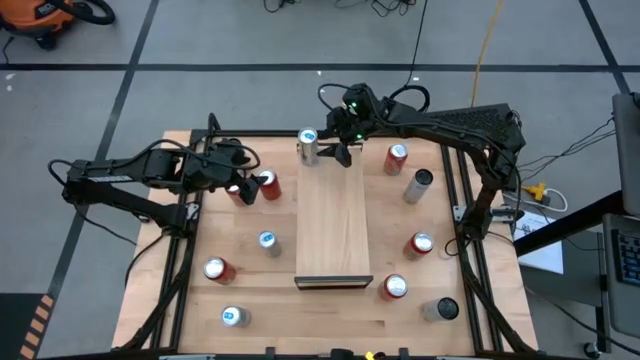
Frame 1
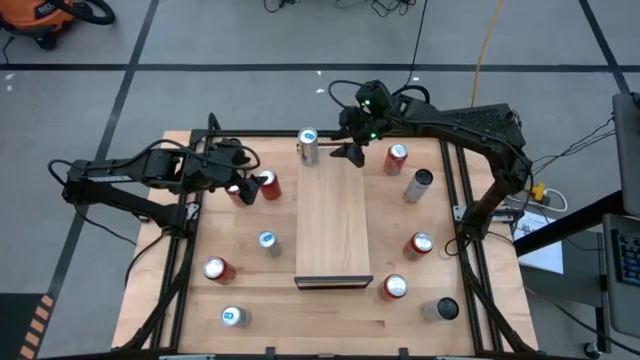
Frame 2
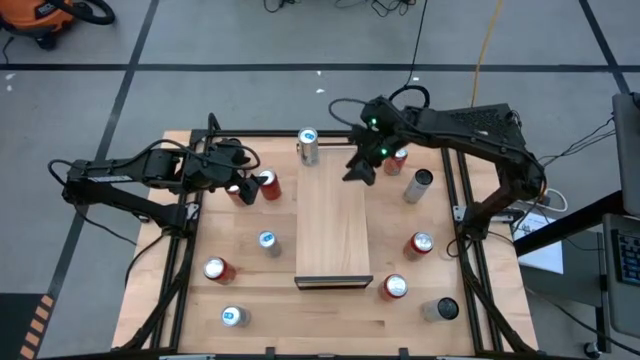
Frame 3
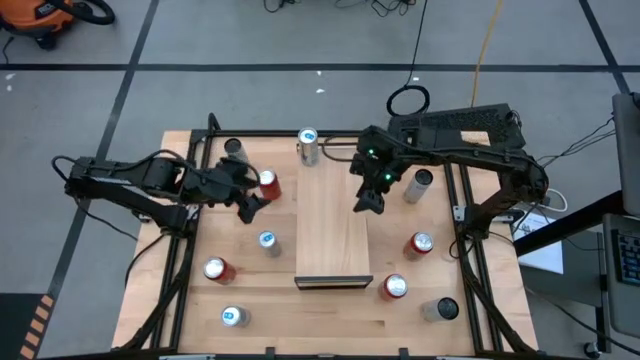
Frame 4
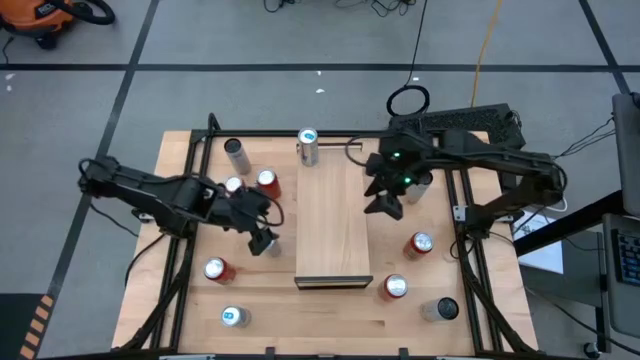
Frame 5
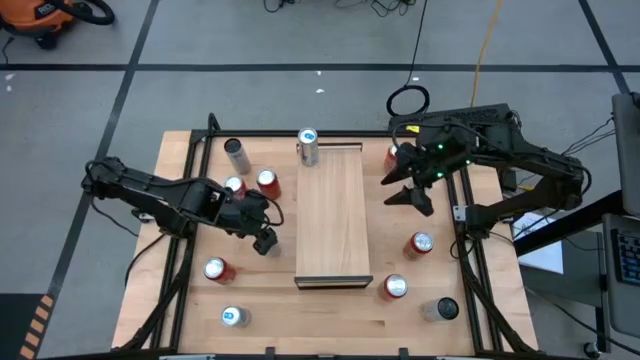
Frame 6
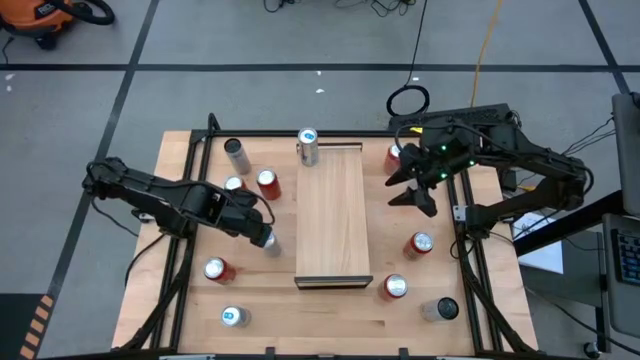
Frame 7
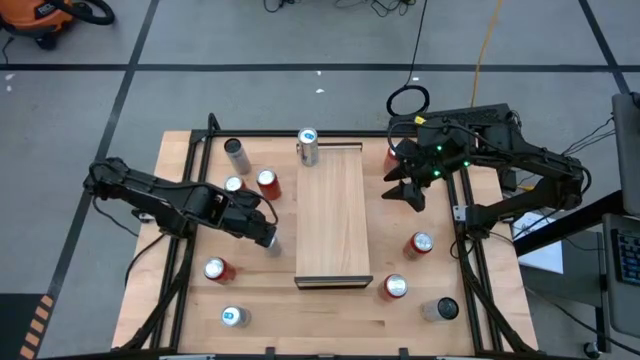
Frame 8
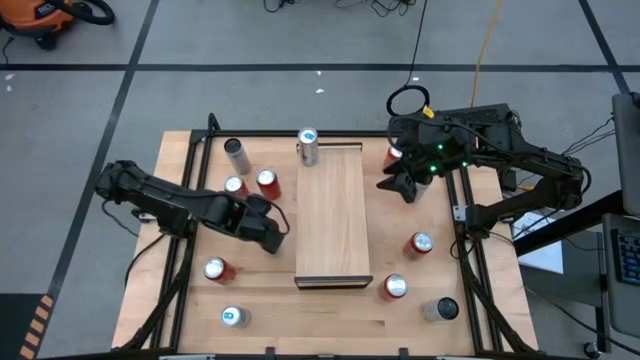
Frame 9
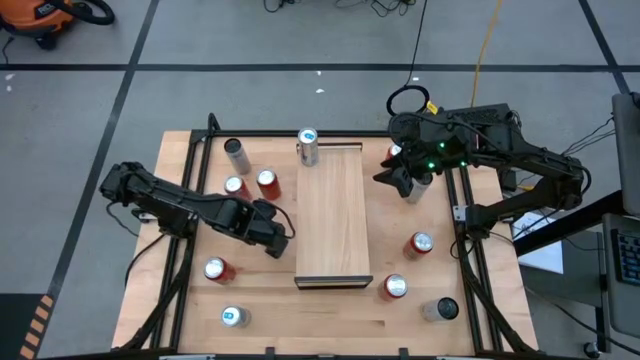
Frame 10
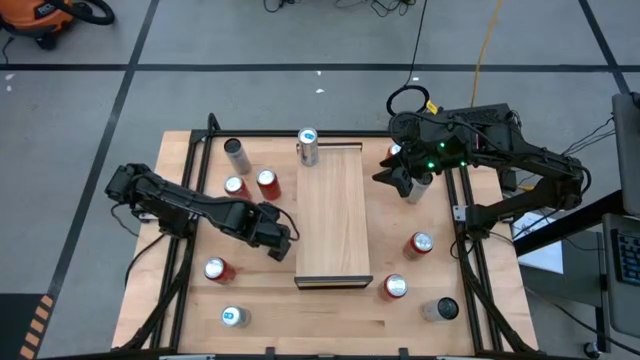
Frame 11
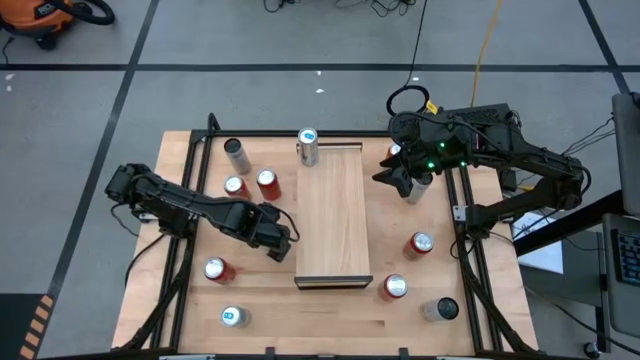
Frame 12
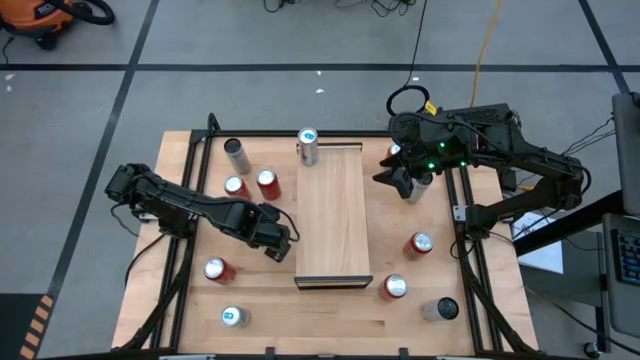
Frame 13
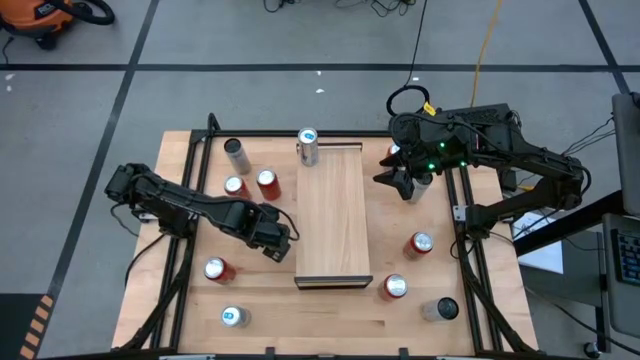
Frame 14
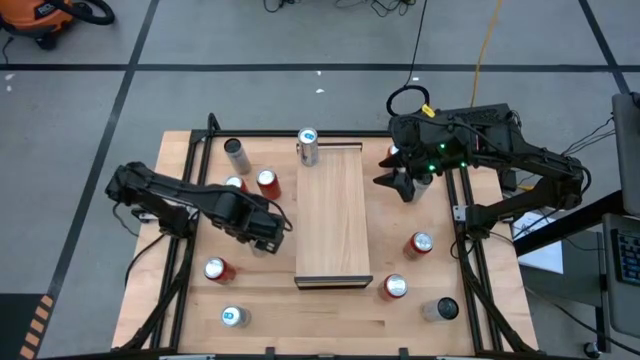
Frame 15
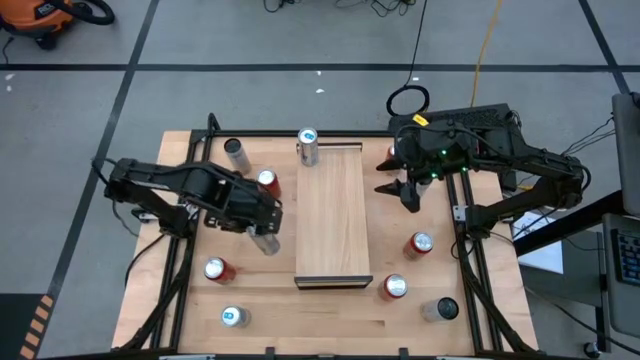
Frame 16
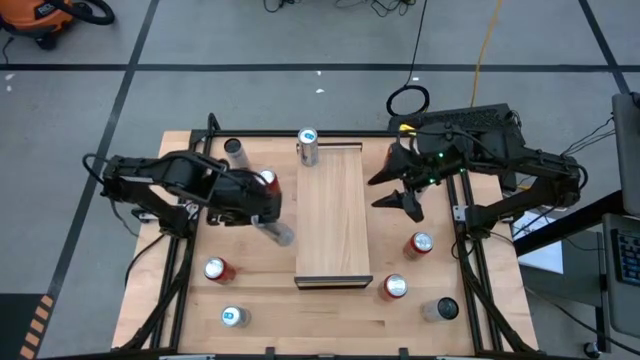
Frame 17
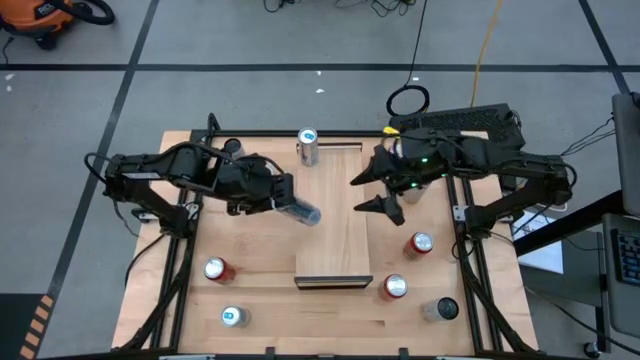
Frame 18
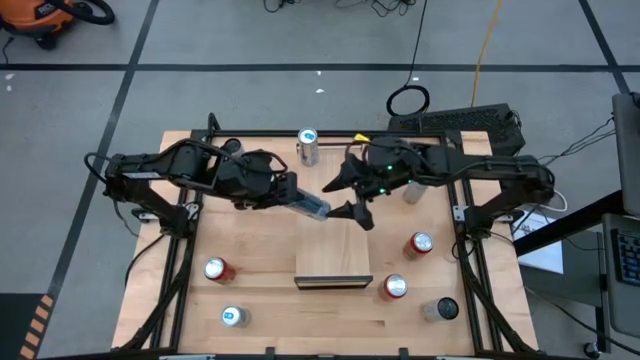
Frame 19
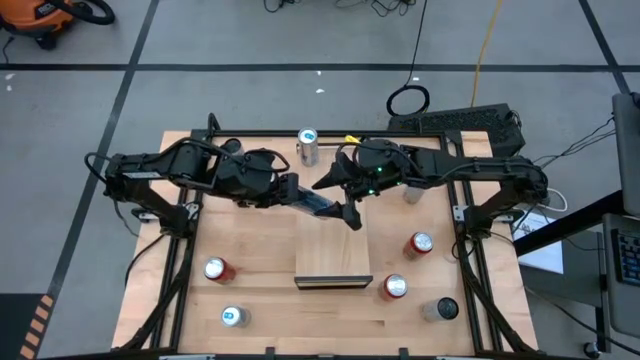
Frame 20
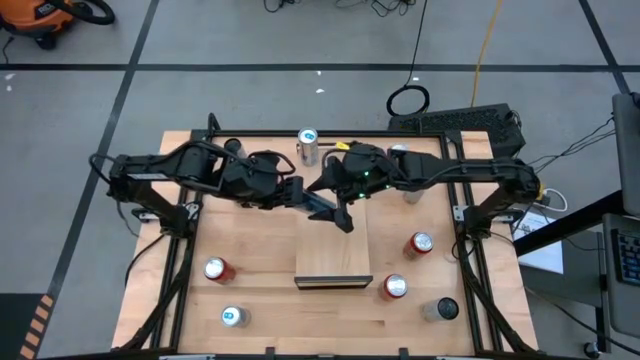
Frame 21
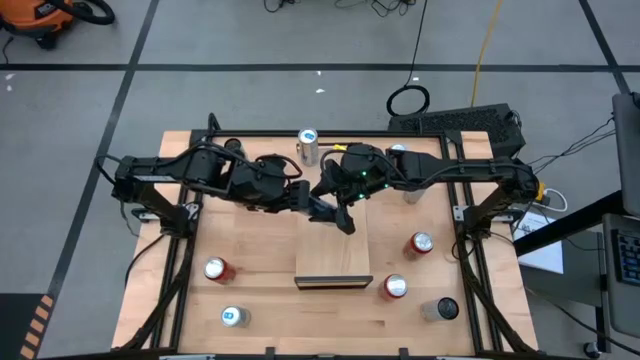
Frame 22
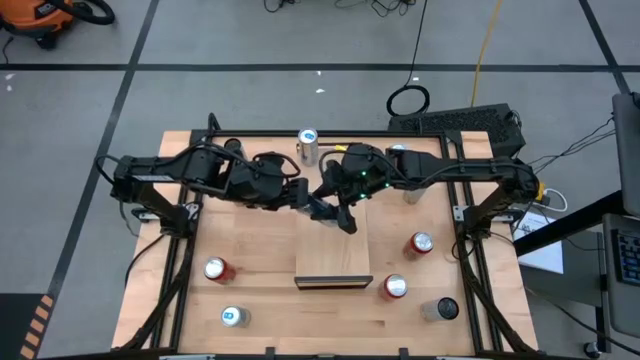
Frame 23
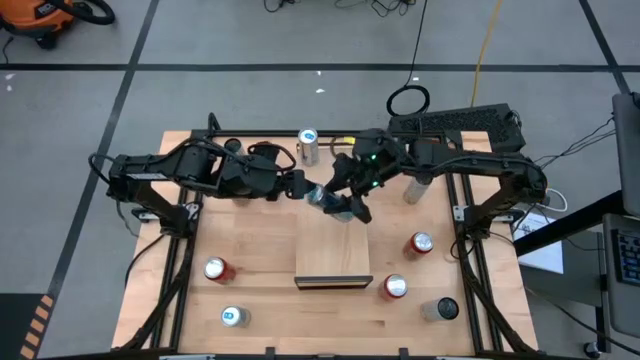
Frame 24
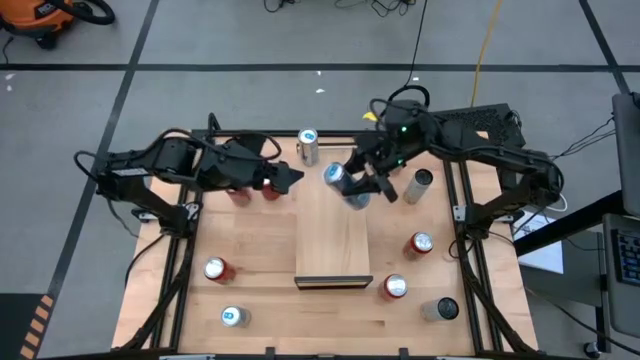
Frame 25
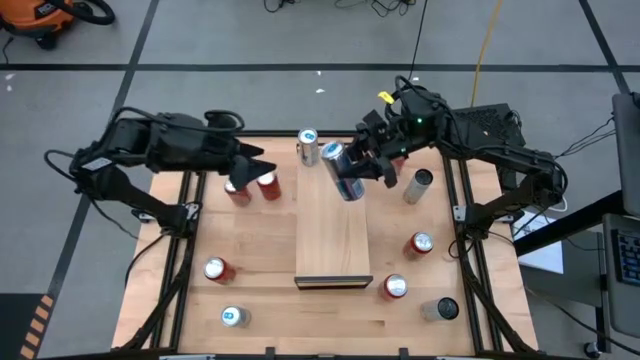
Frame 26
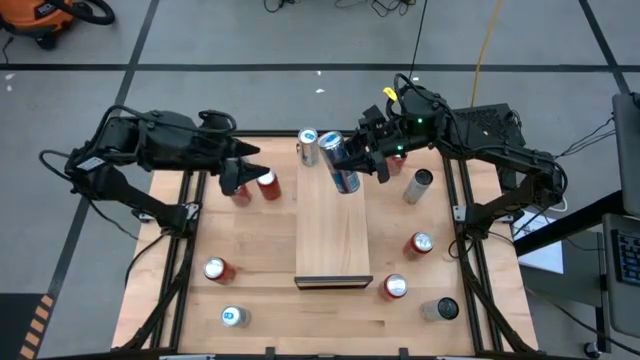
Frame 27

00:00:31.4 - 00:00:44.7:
Task: Place canned beverage on shelf
Put the top blue soda can on the shelf aligned with the other blue soda can

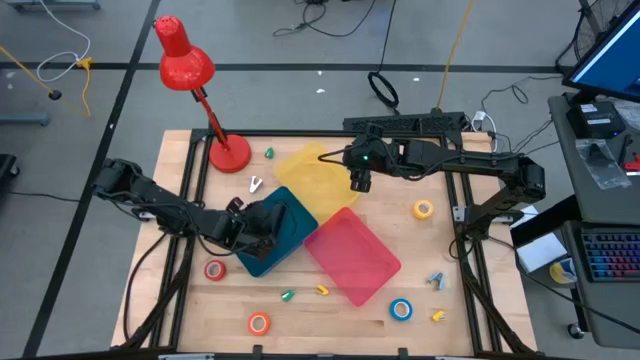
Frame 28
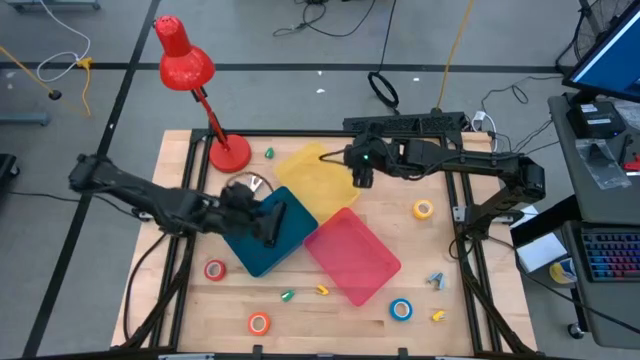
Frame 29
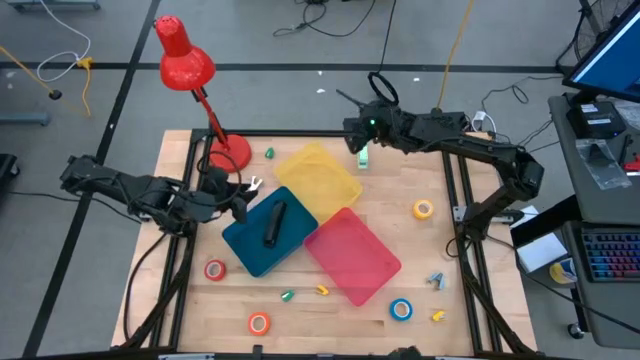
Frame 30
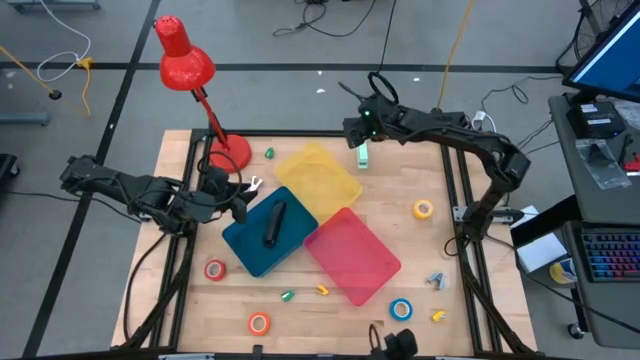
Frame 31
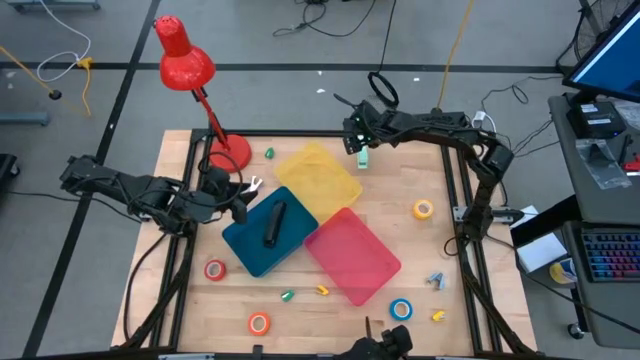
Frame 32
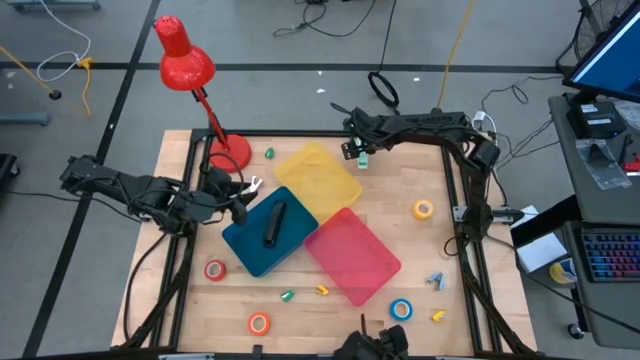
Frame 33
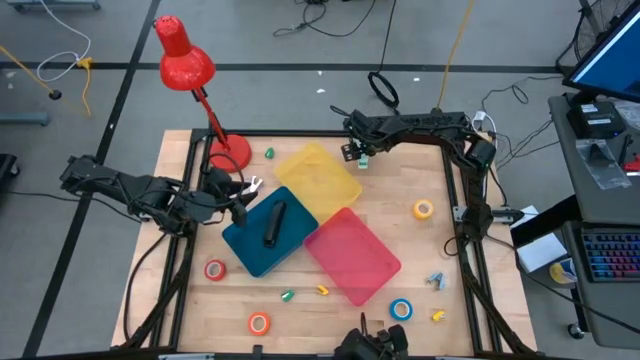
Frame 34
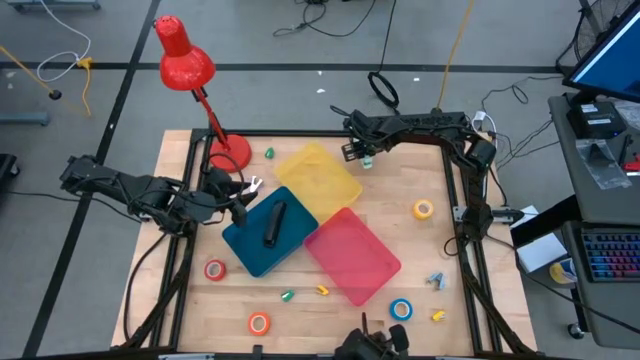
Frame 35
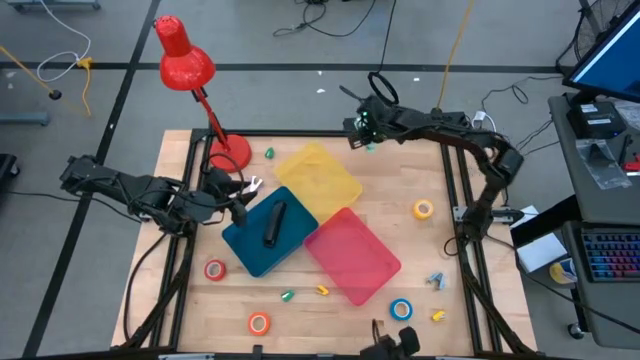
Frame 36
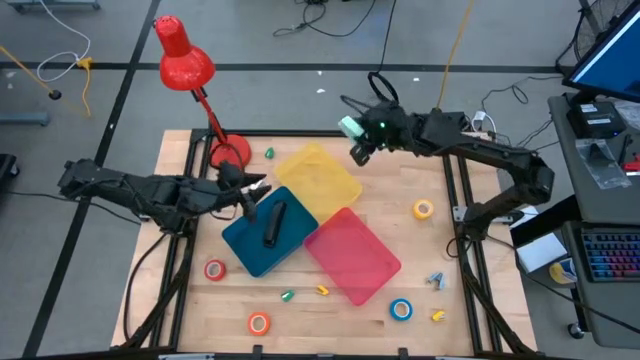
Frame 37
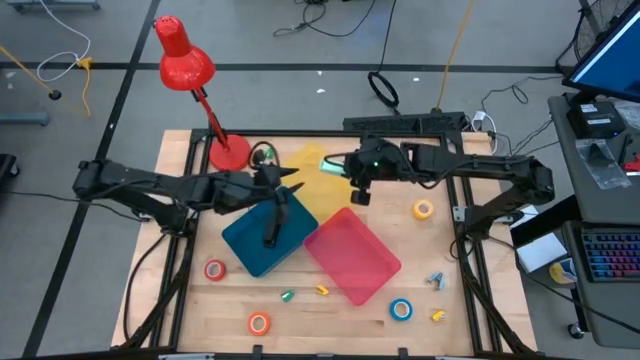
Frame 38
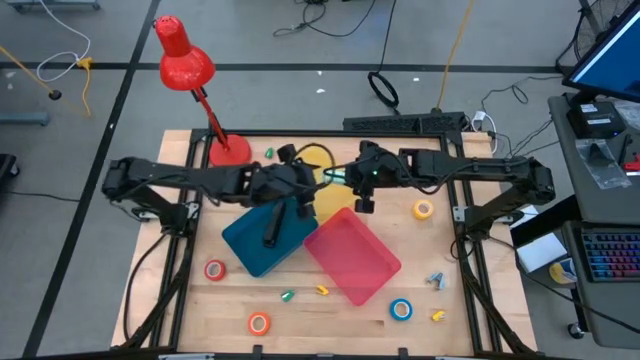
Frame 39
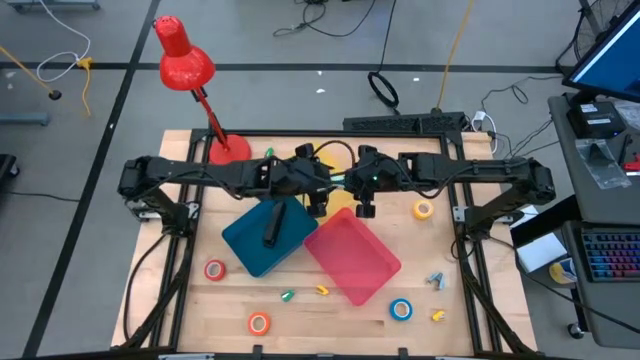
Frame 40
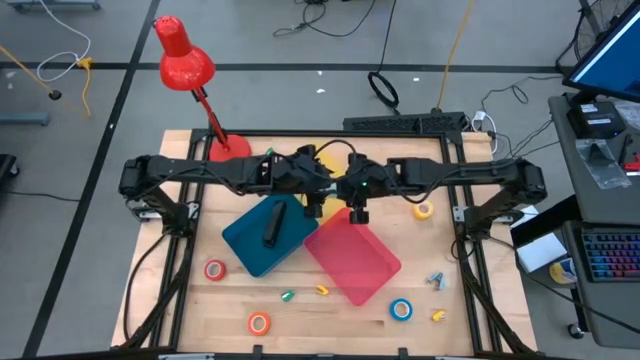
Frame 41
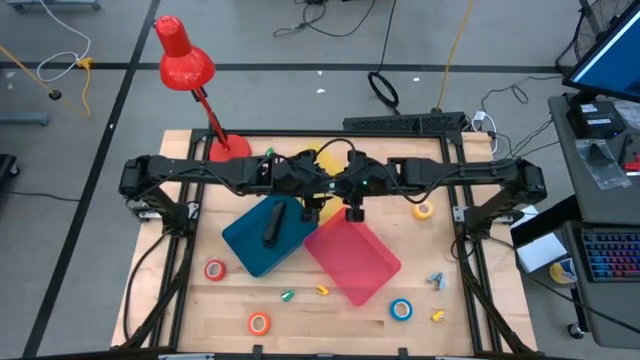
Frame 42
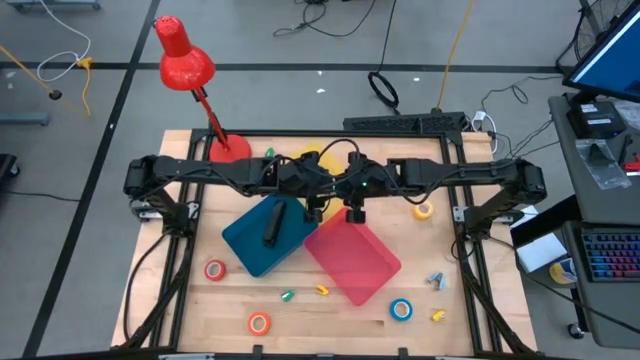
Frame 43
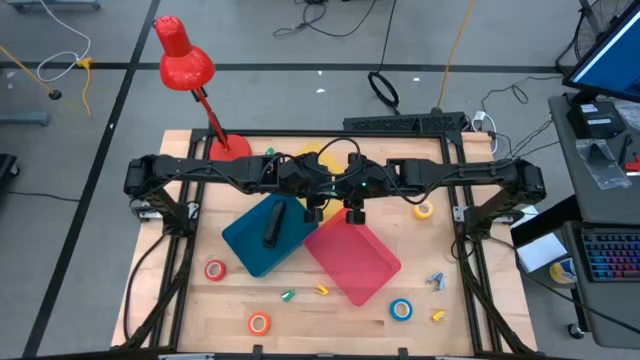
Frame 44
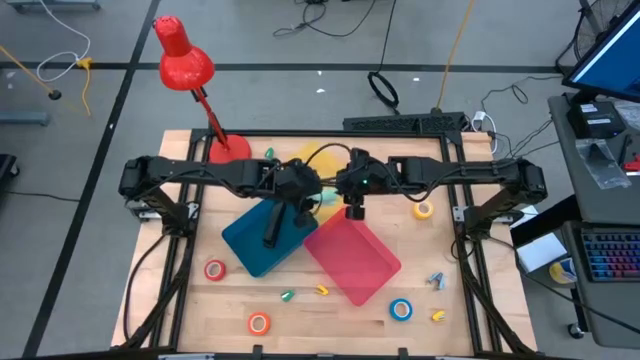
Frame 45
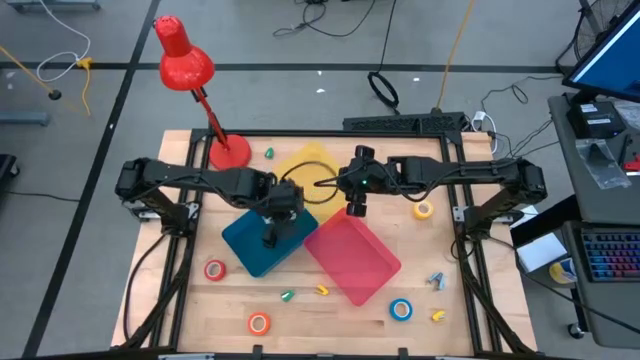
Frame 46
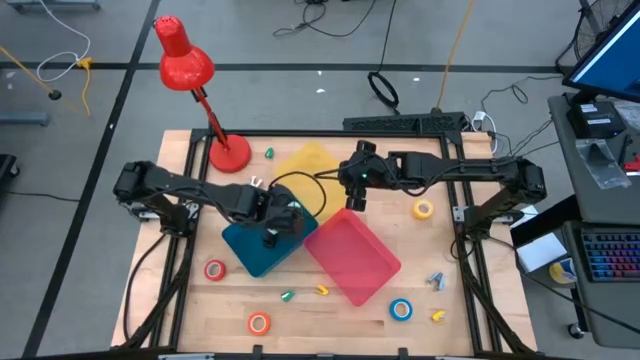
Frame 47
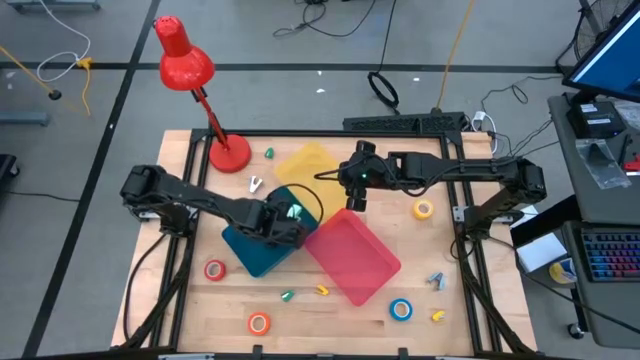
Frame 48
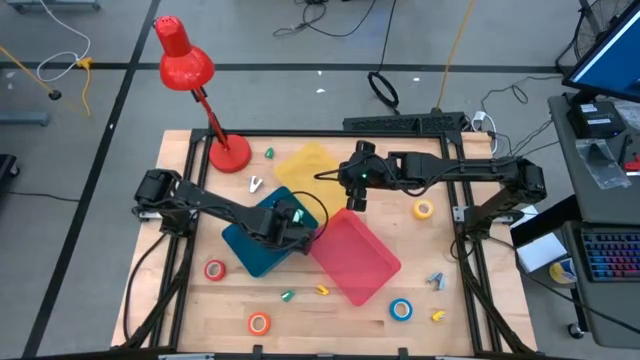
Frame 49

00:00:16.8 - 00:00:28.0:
Task: Pick and place Stapler, Stapler remover, tape
Put the large light green stapler into the blue bin
